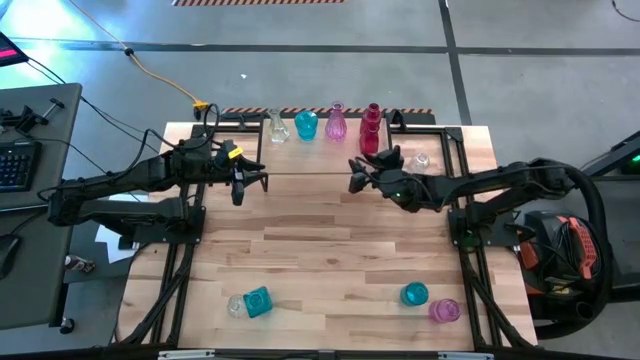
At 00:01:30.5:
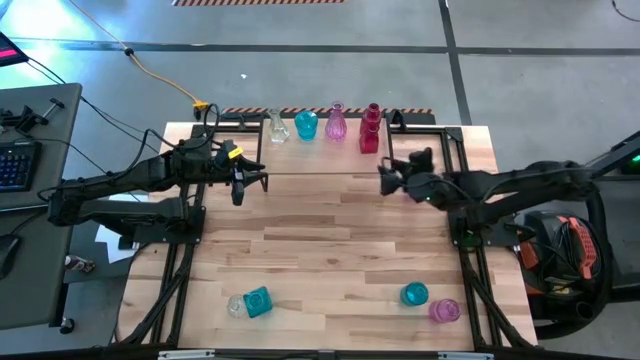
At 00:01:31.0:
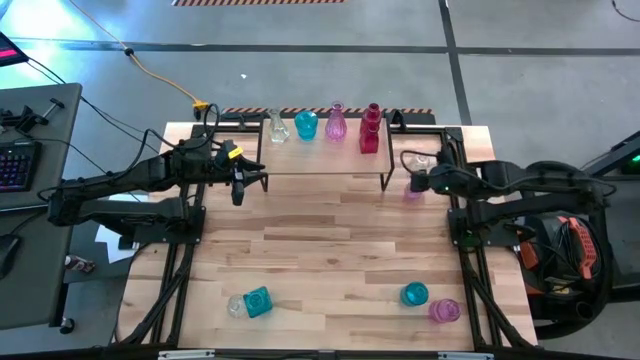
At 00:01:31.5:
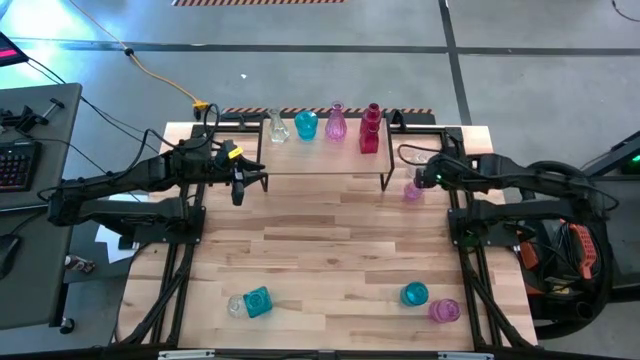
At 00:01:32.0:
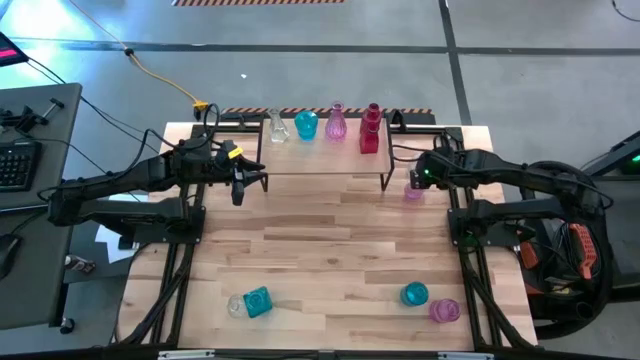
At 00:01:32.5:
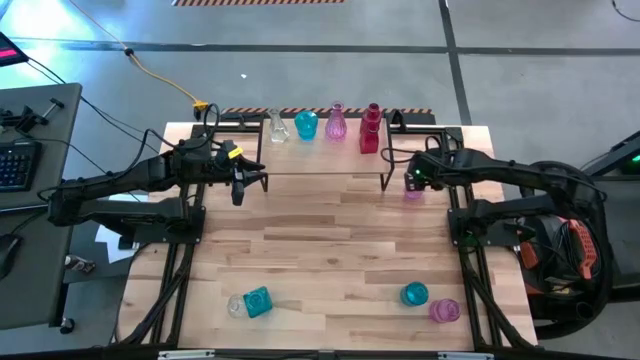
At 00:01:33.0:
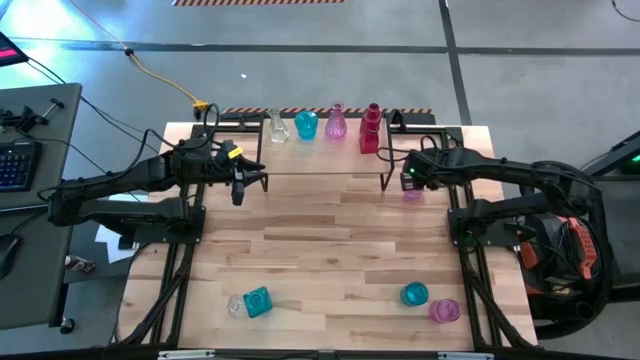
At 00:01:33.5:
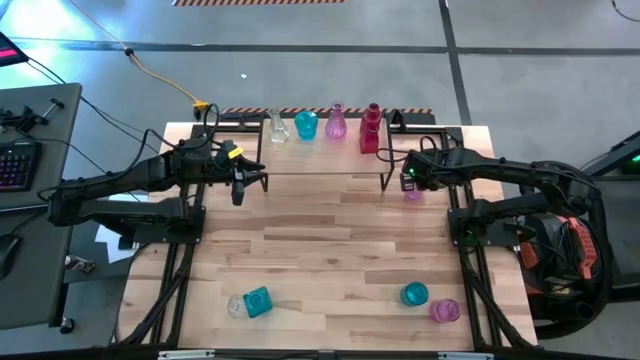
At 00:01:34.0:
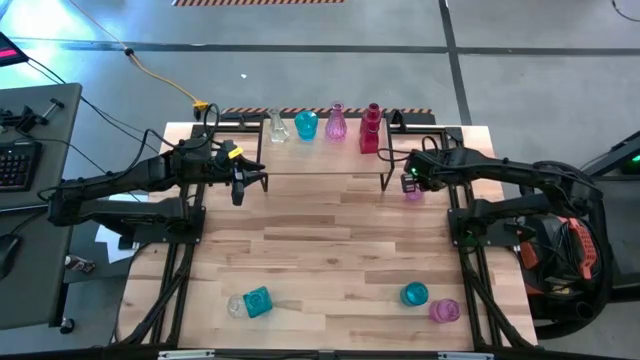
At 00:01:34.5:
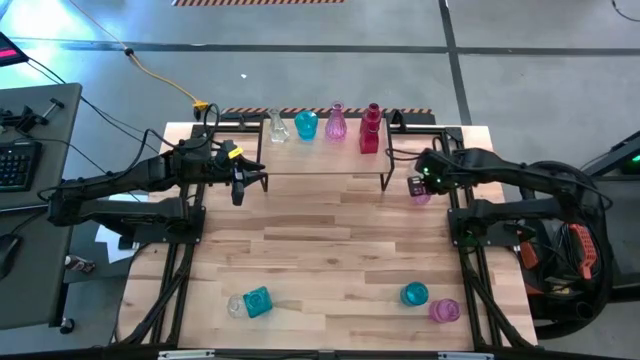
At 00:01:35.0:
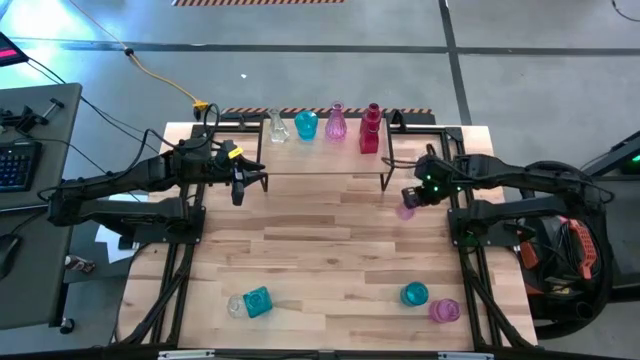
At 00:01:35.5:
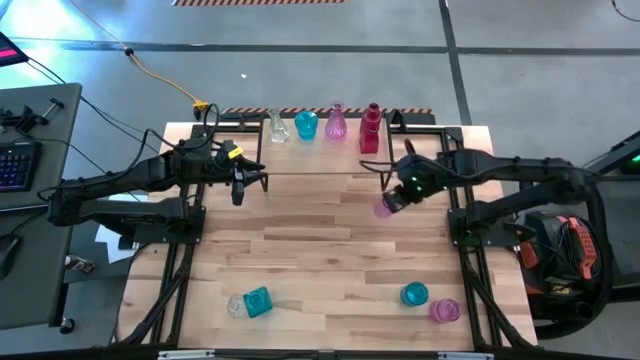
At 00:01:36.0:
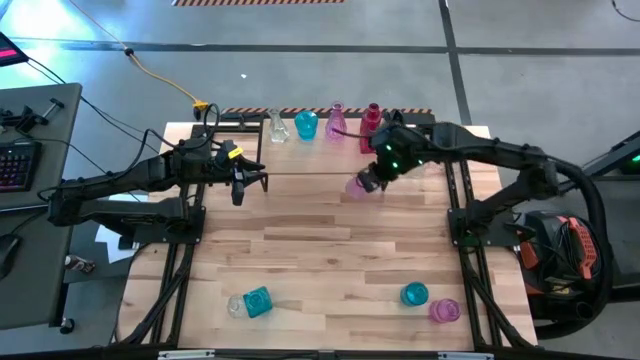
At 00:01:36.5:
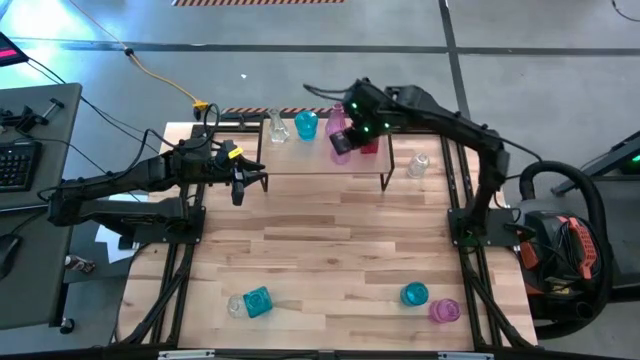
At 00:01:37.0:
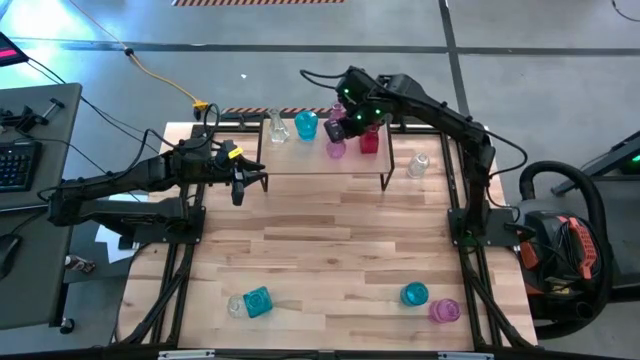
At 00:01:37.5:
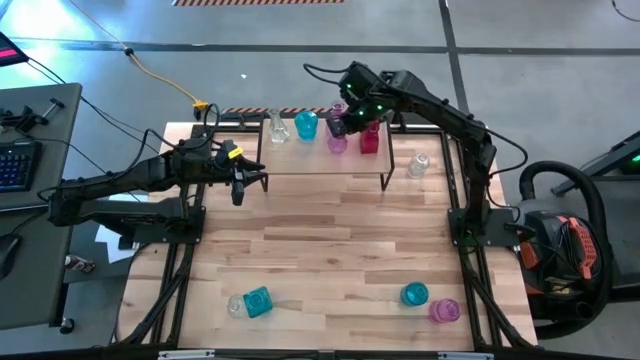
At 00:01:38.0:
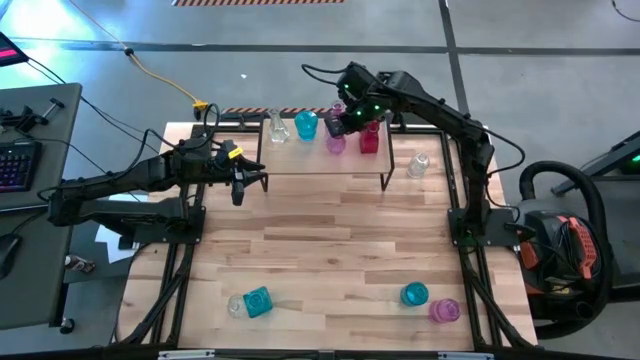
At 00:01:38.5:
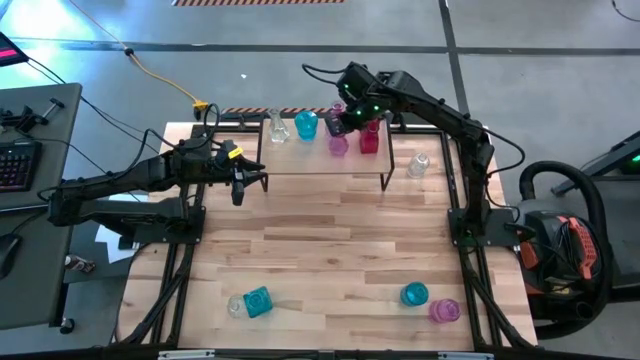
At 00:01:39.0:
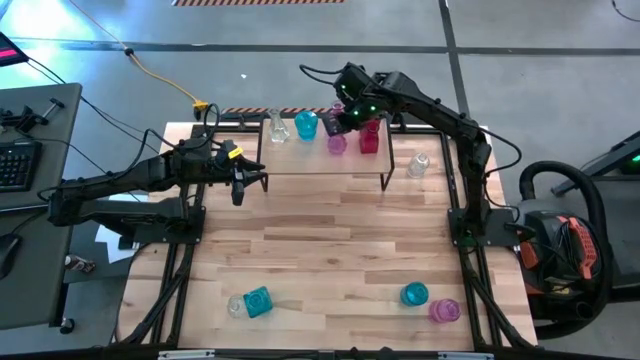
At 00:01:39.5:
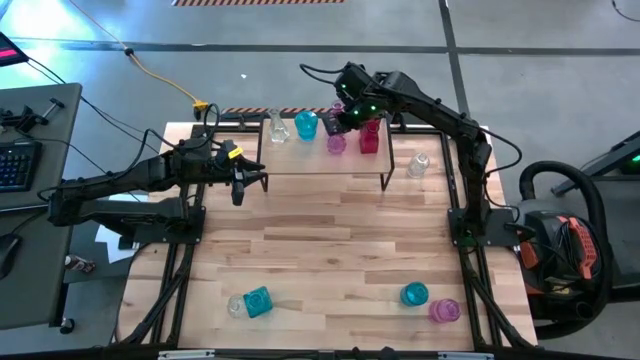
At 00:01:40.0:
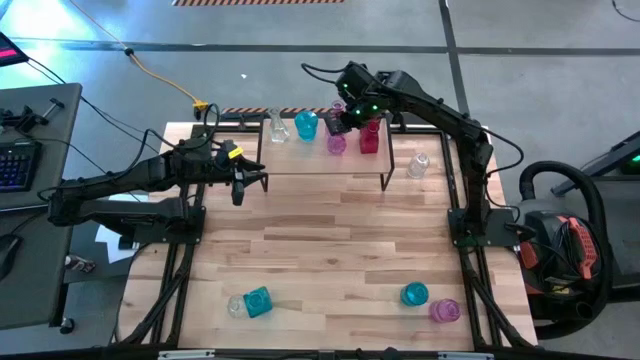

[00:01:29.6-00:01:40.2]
Task: sort vases onto shelf
Put the top purple flower vase on the shelf aligned with the other purple flower vase

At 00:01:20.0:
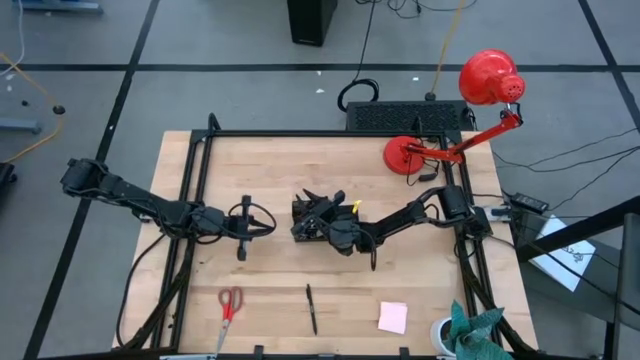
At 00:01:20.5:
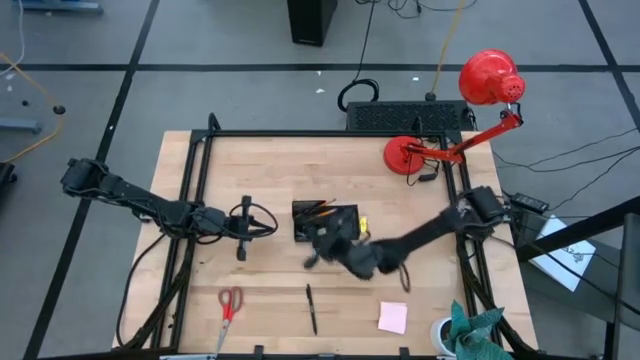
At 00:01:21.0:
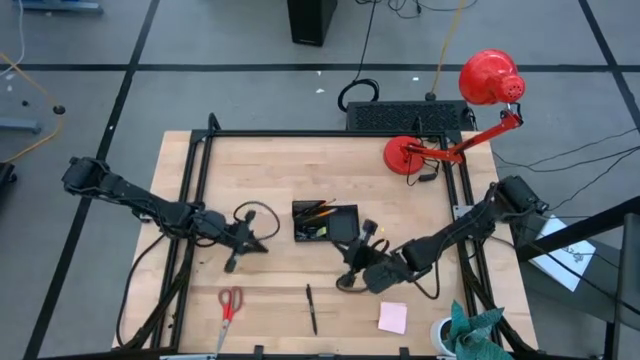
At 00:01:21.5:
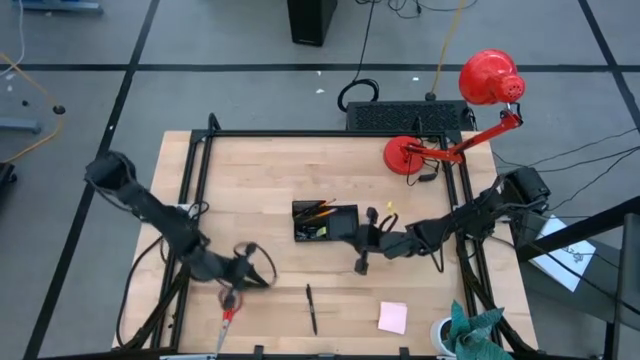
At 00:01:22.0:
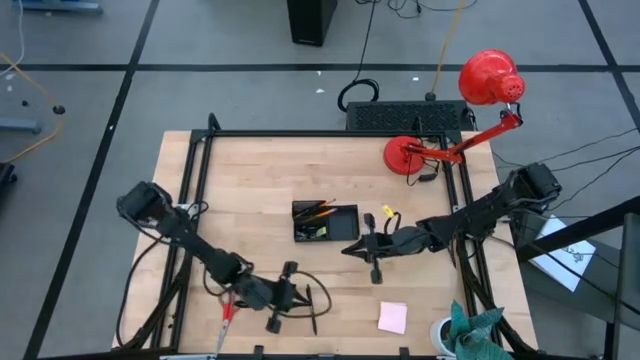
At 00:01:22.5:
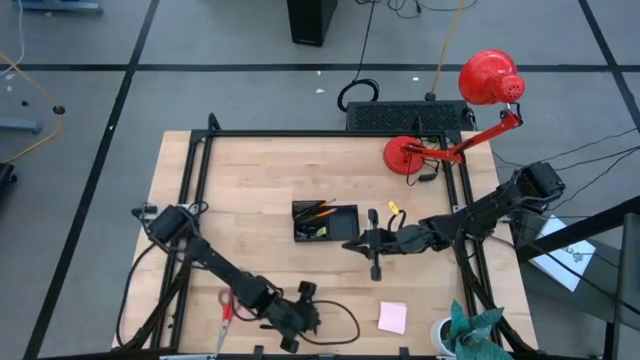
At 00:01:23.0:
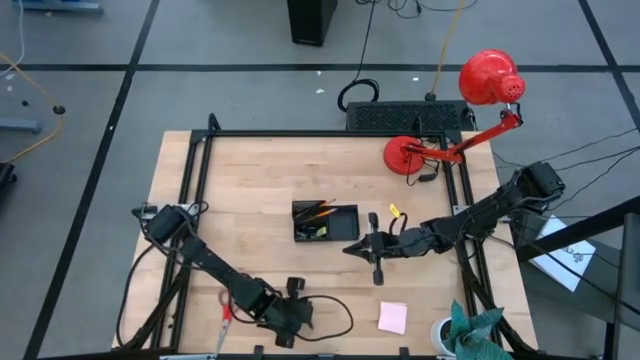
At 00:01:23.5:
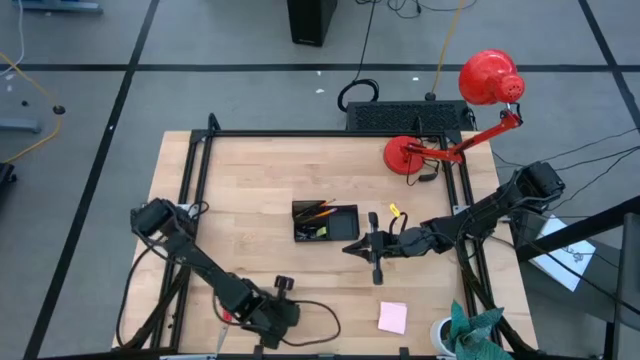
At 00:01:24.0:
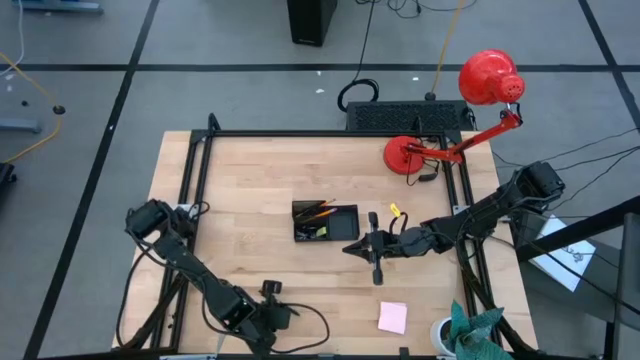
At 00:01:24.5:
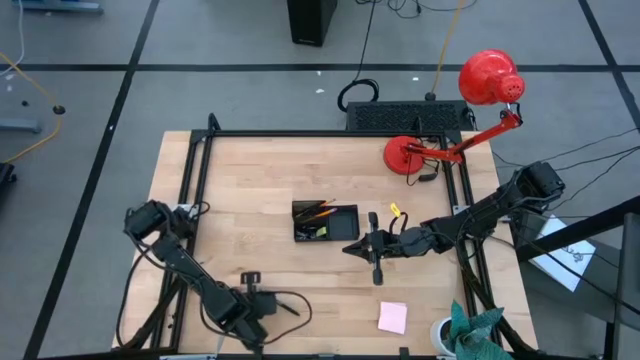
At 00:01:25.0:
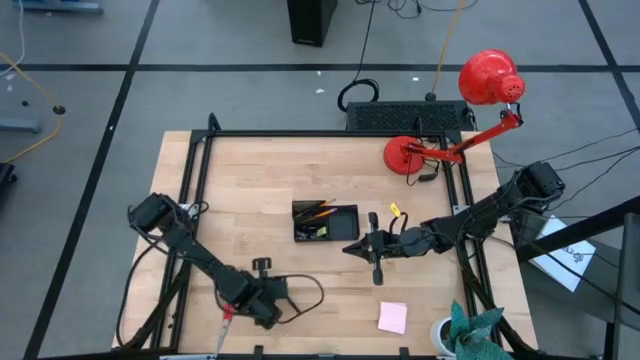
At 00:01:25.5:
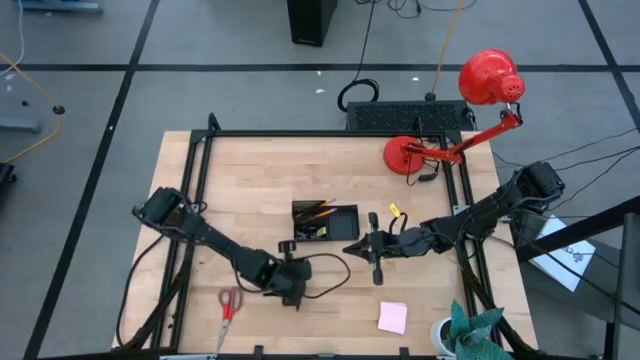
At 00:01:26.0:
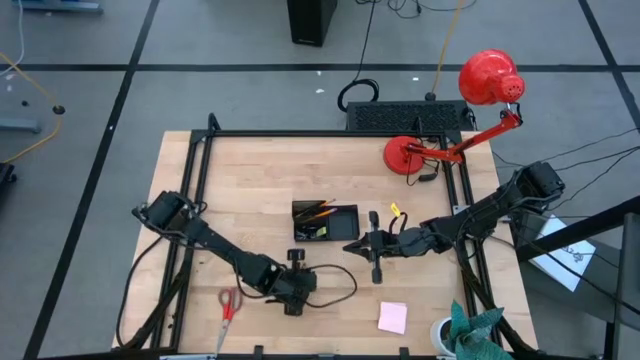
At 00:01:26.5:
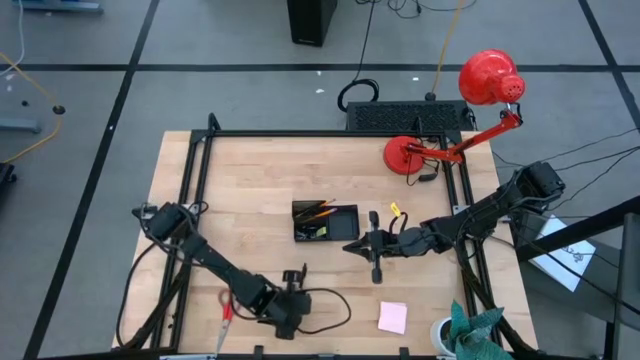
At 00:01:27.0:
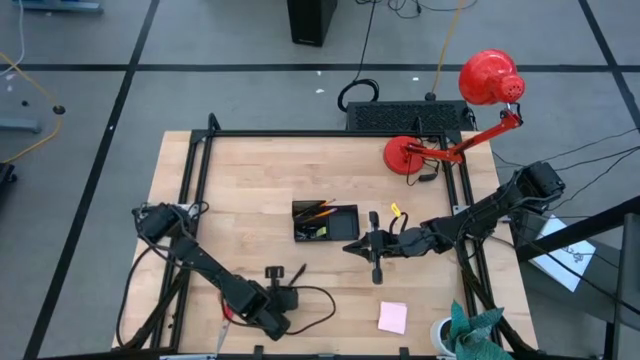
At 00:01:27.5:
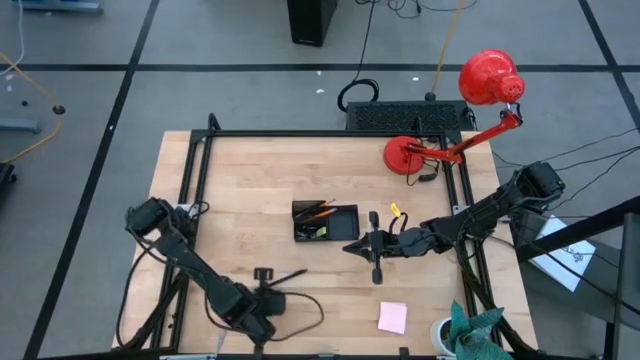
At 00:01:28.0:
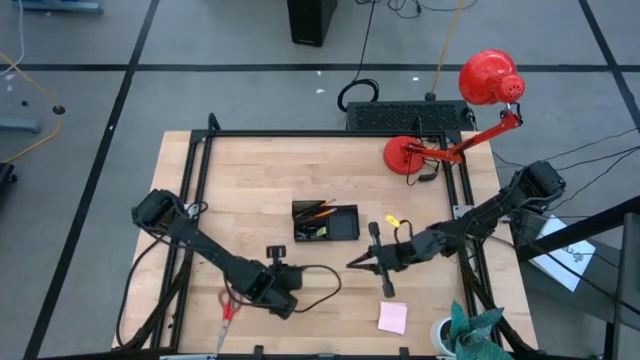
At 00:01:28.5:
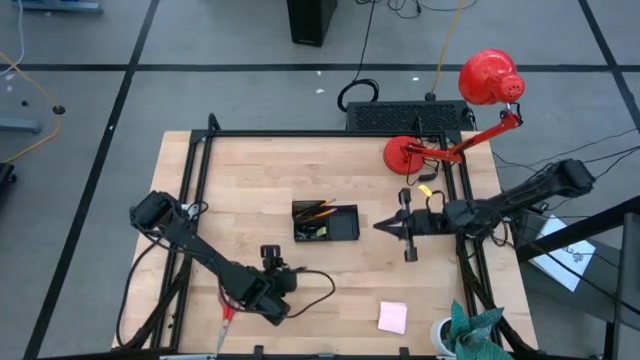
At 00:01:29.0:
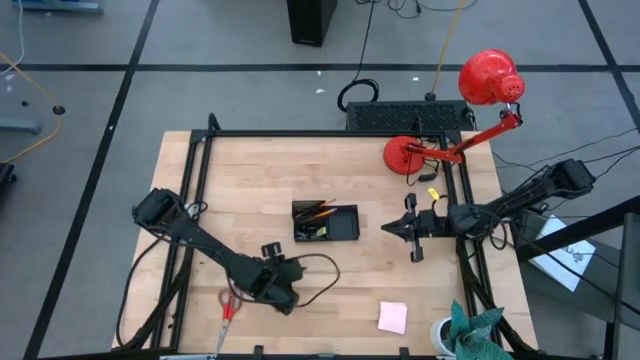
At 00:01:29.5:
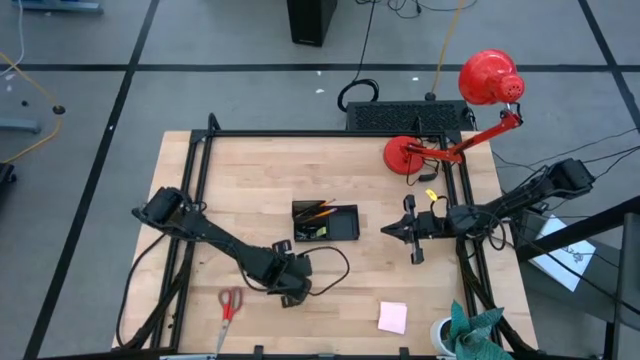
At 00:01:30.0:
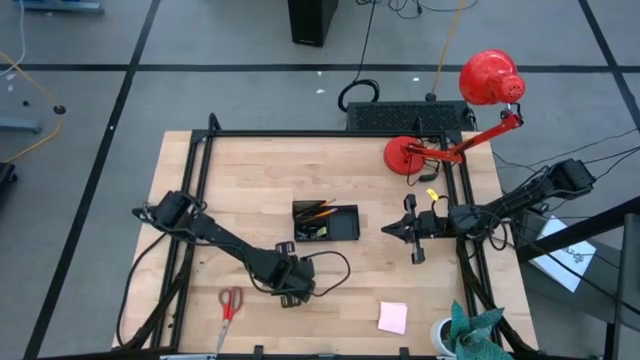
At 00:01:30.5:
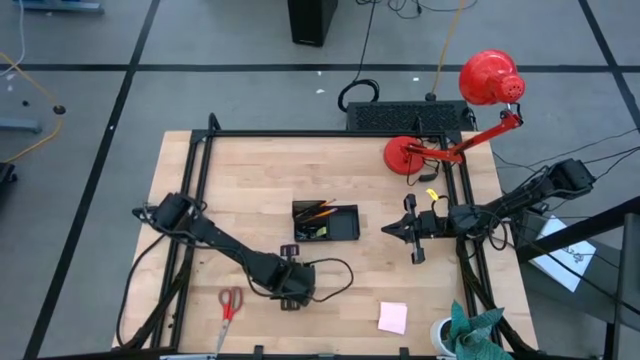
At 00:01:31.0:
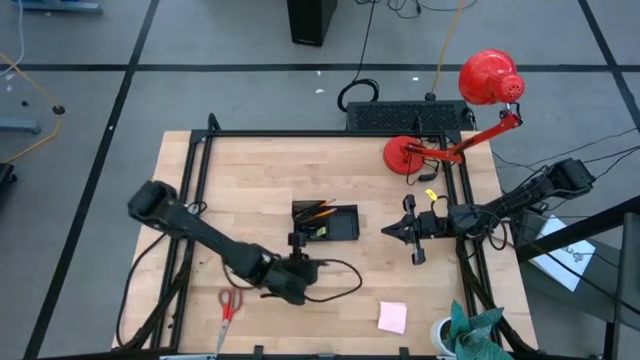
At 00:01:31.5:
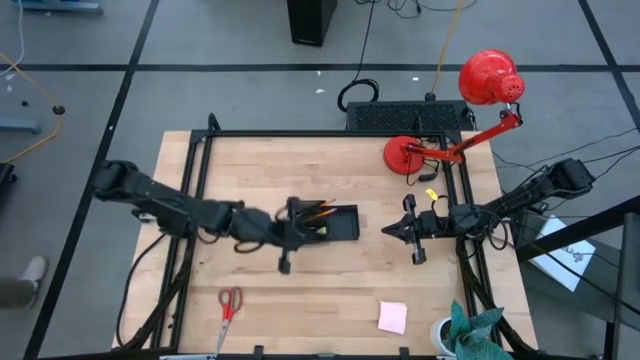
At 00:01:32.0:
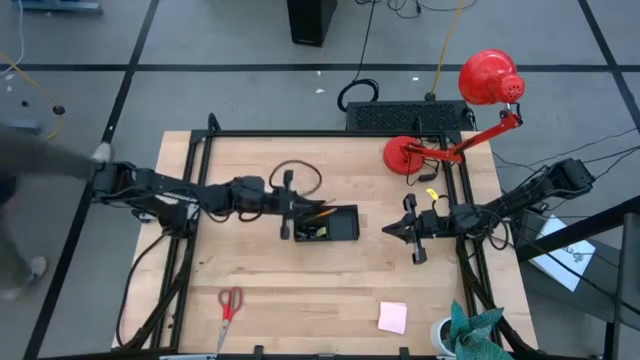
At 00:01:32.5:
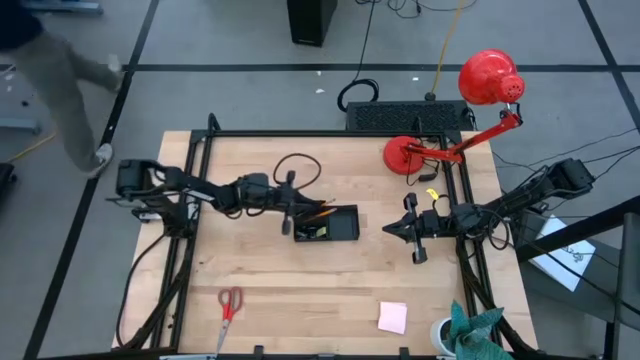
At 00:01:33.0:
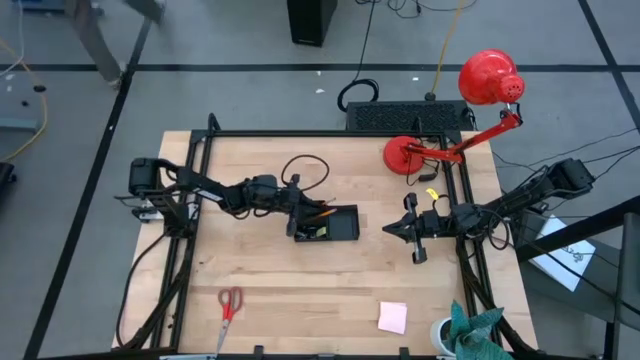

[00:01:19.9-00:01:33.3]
Task: Pick and place office supplies into organizer
Put the black pen into the desk organizer
